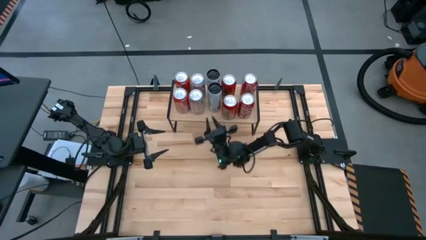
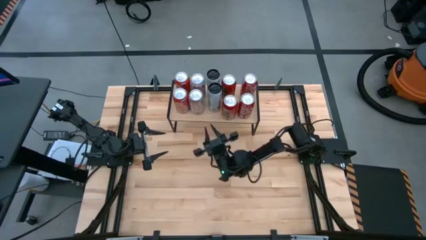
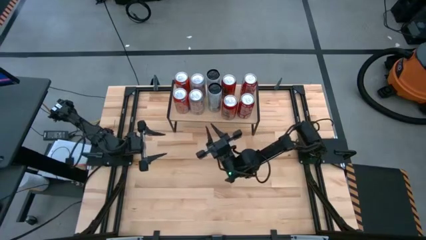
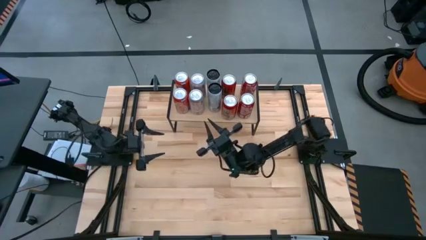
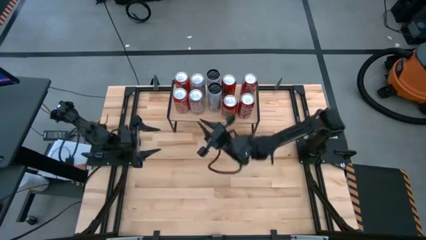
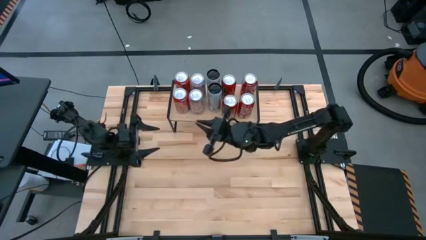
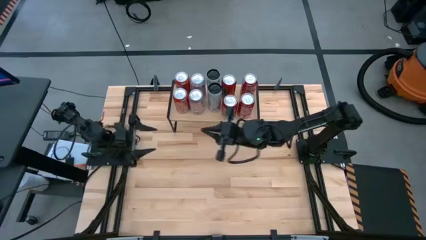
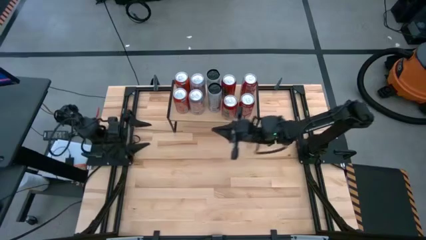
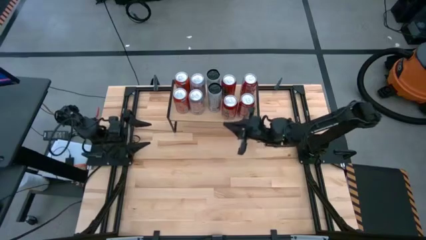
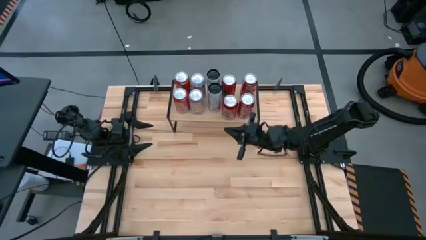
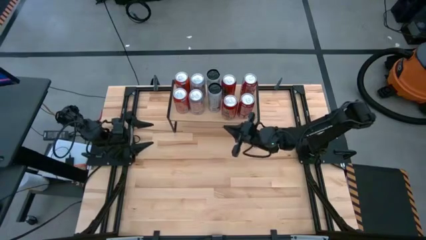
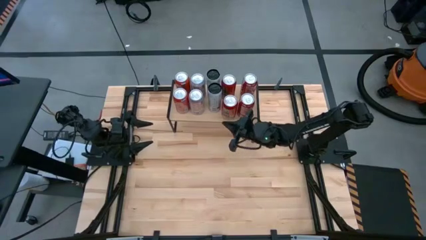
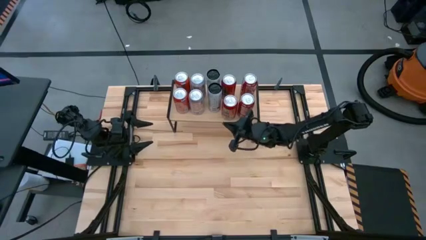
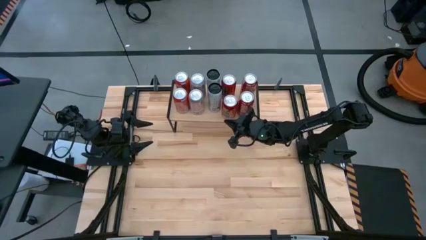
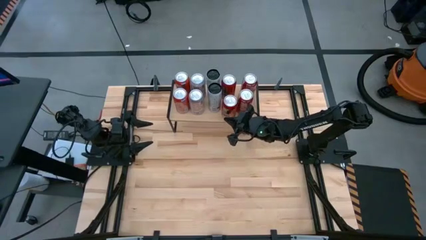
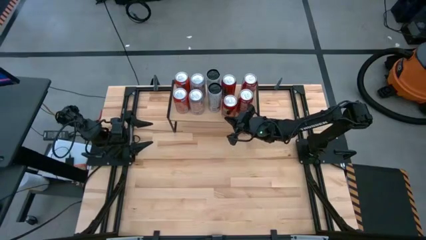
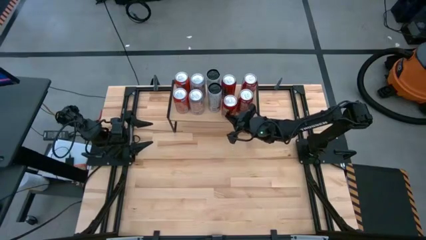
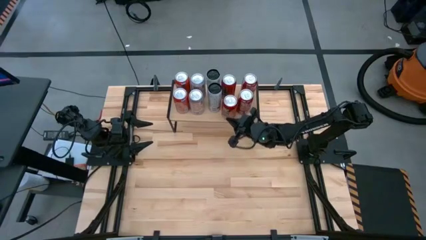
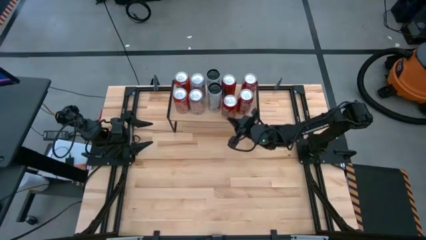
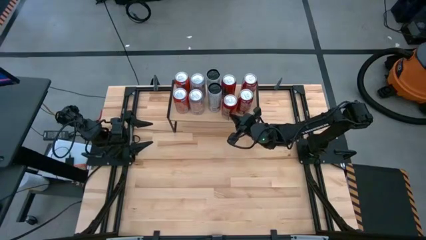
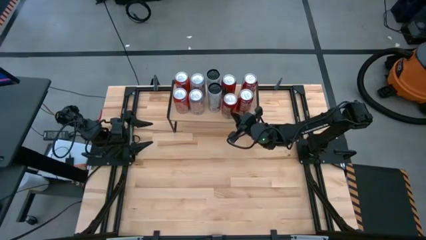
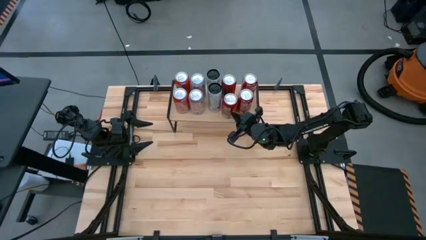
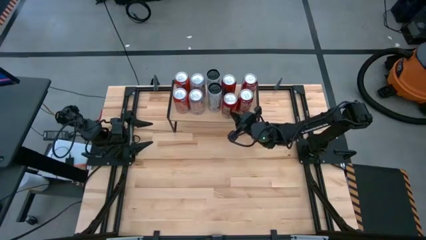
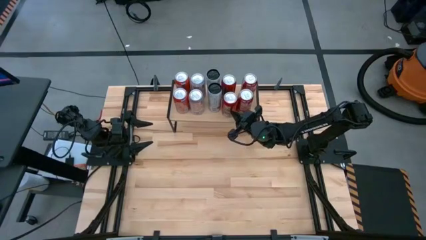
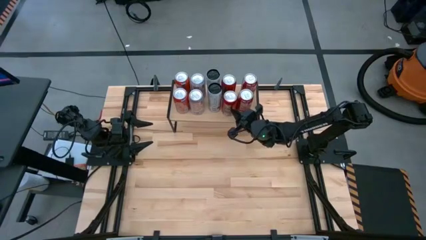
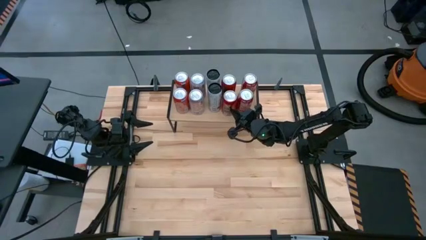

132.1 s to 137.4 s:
Task: Place canned beverage on shelf
Adjust the bottom red and black soda can on the shelf

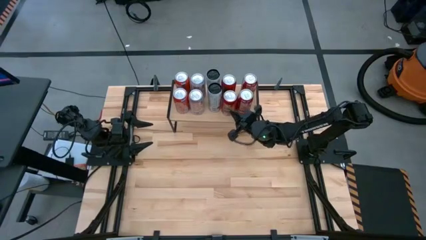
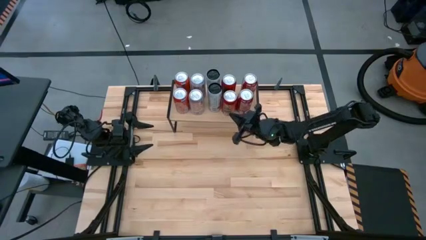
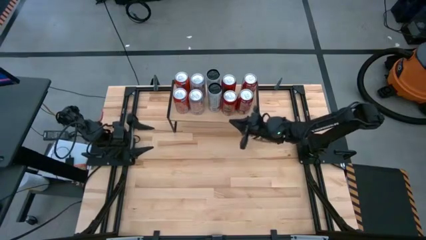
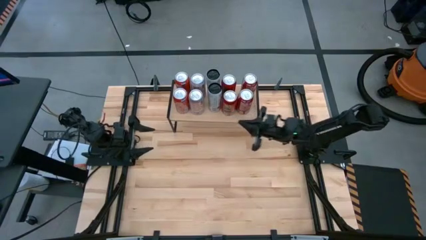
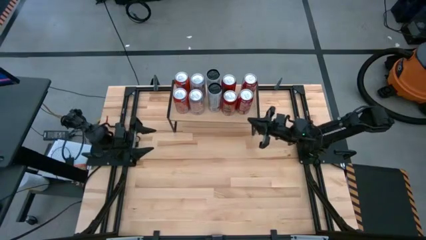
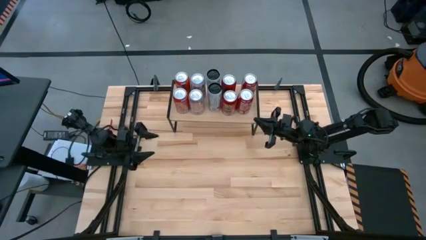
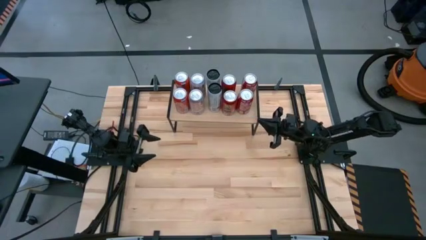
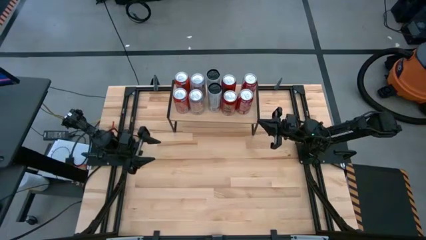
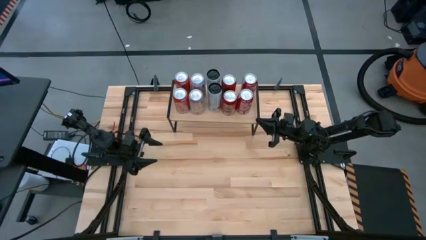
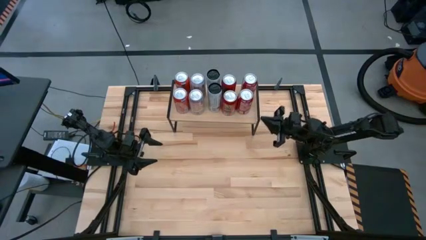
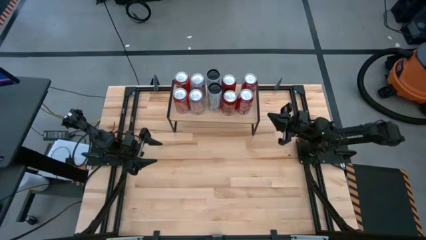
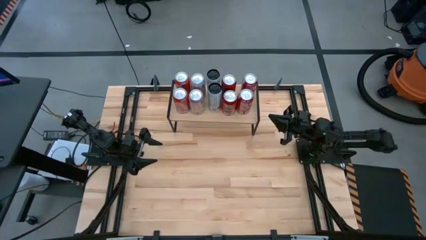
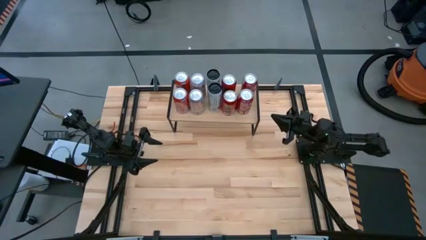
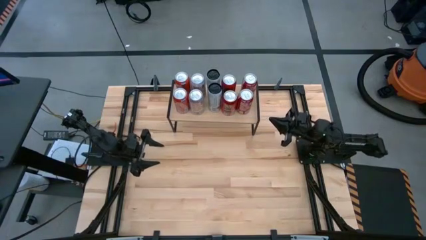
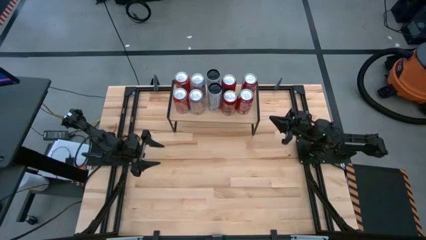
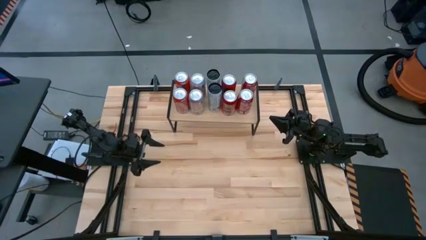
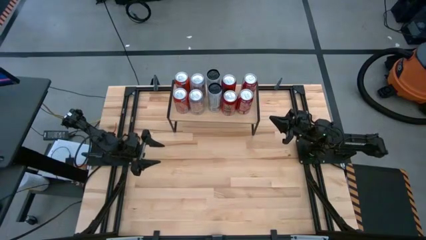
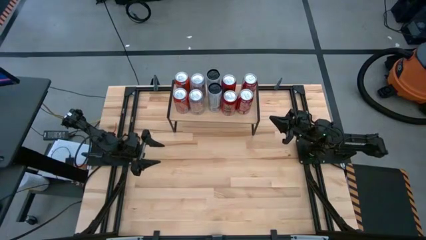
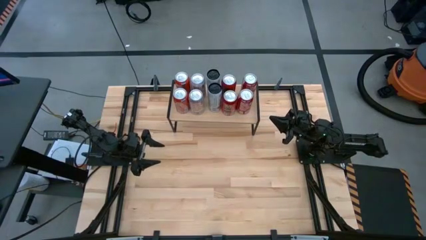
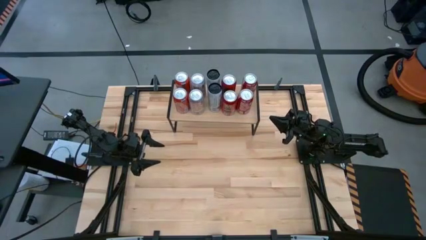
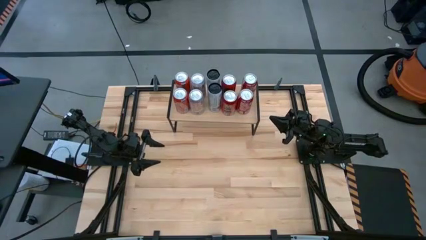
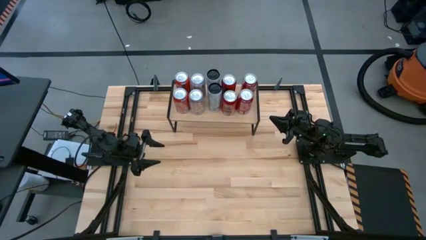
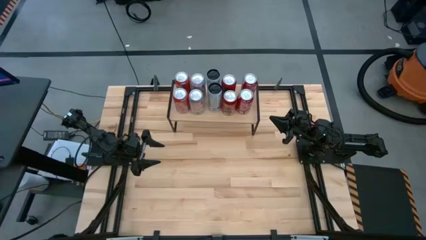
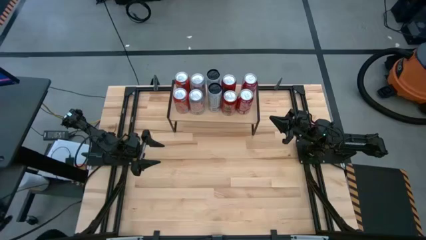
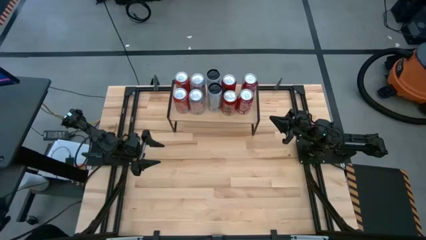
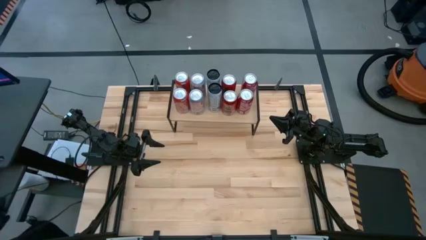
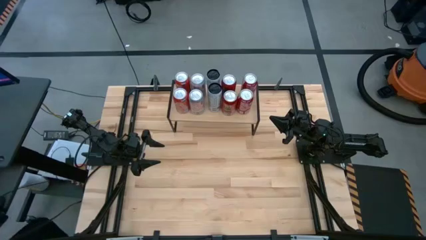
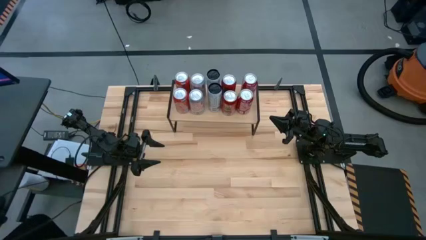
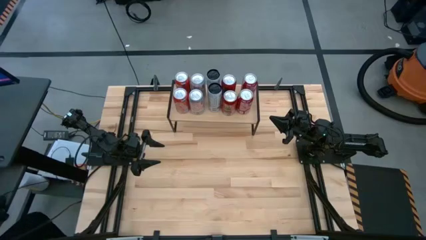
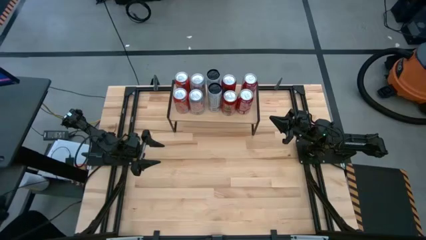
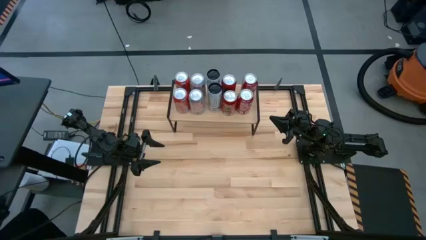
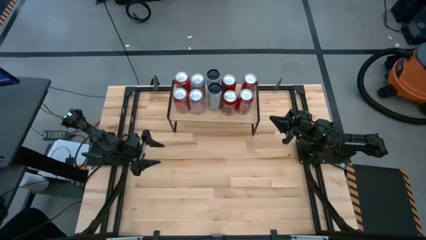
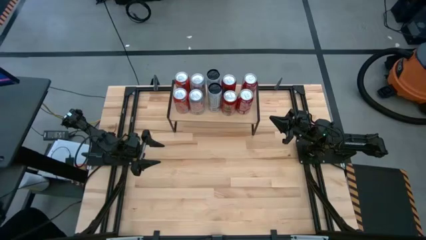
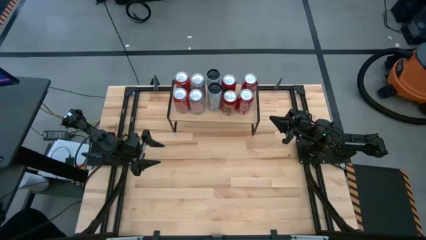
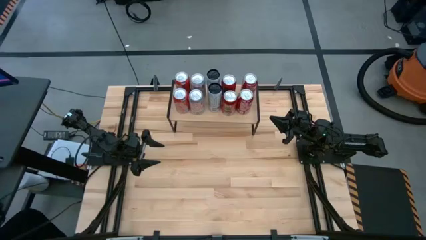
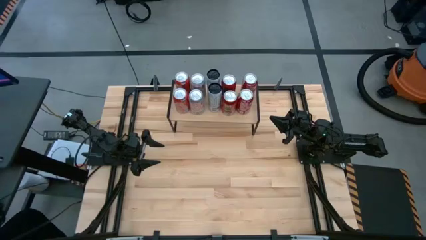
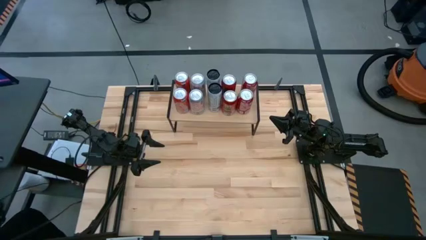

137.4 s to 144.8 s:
Return to Home Position

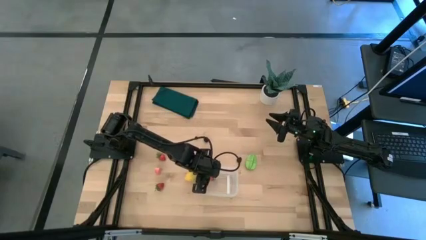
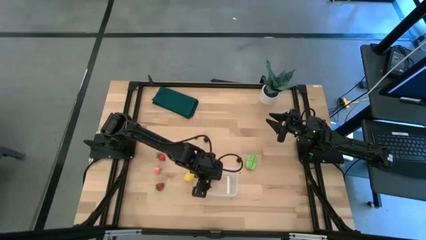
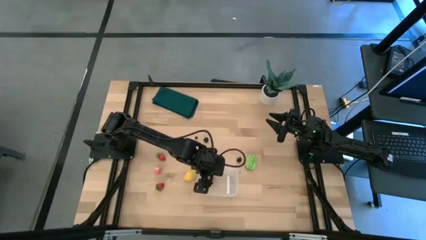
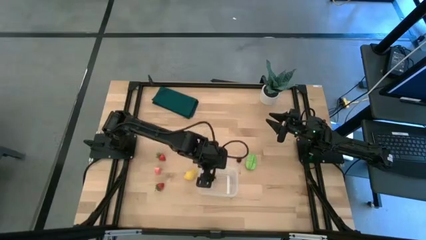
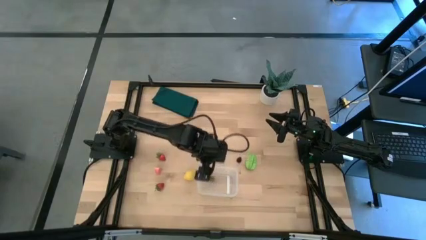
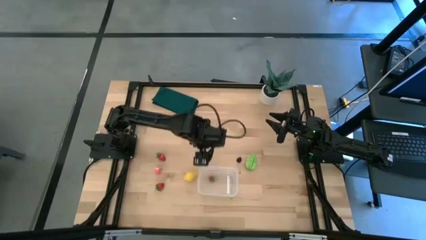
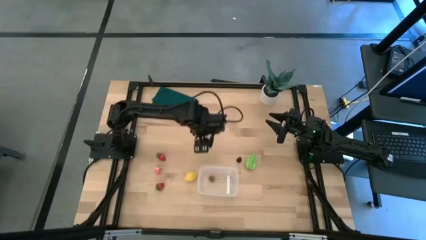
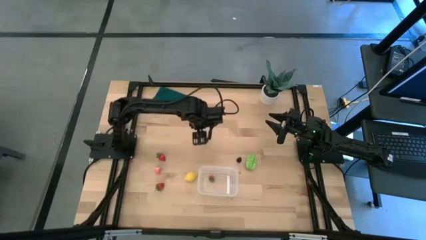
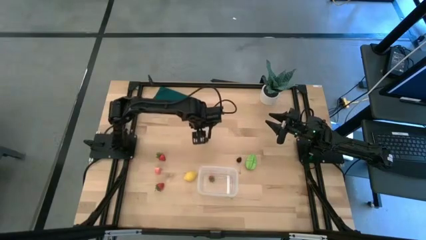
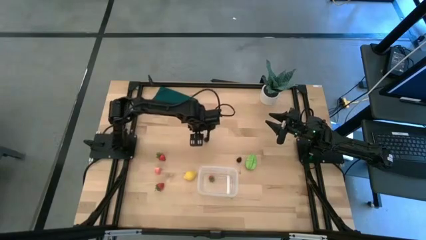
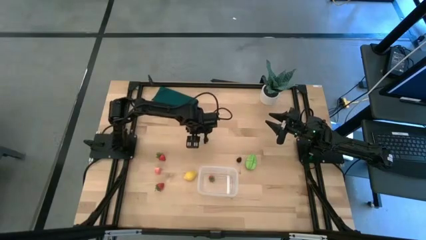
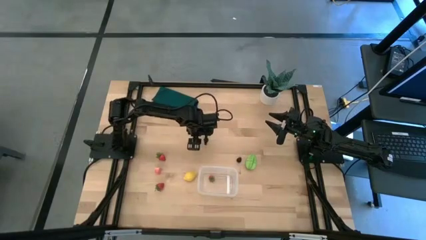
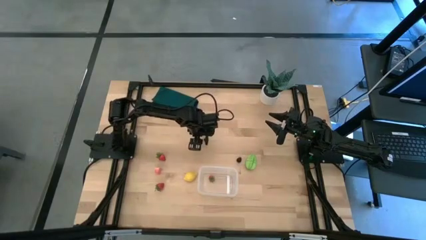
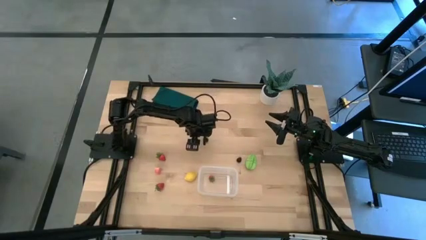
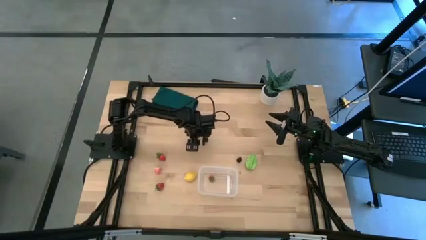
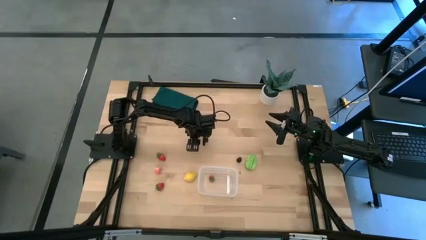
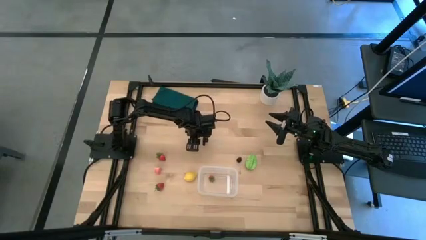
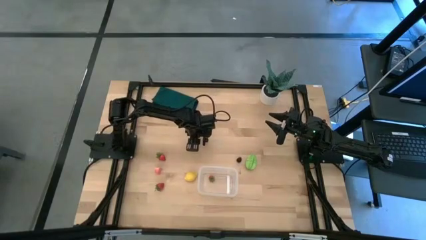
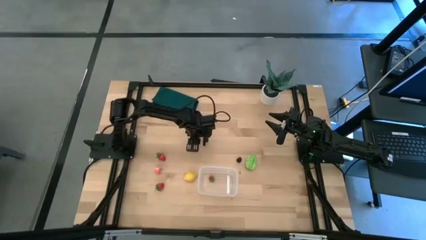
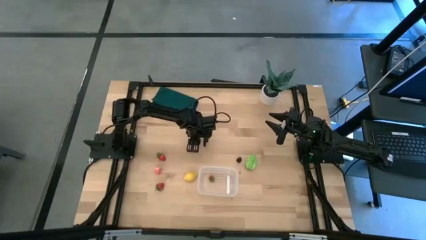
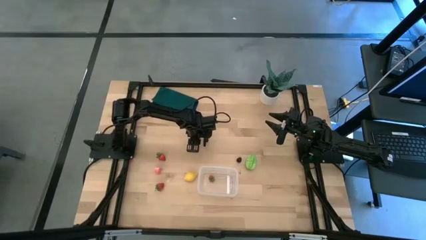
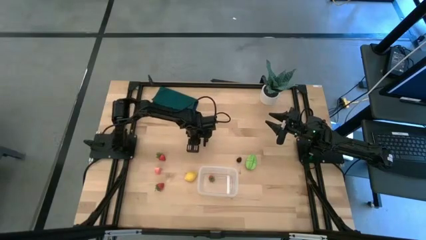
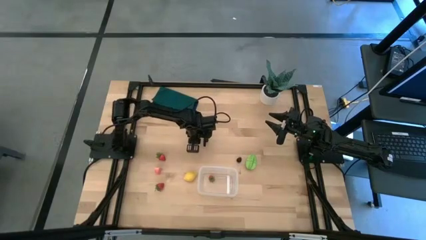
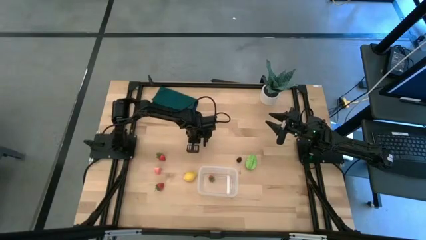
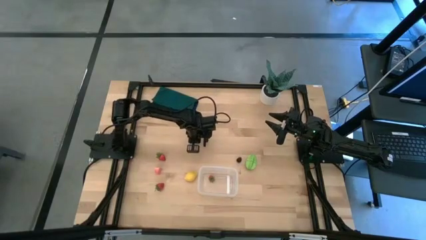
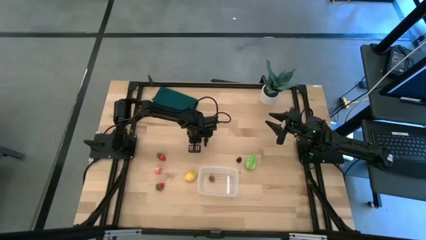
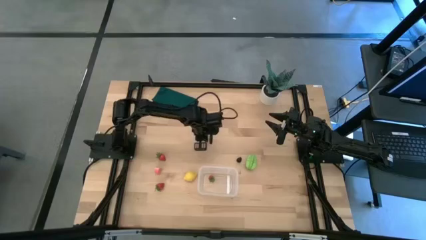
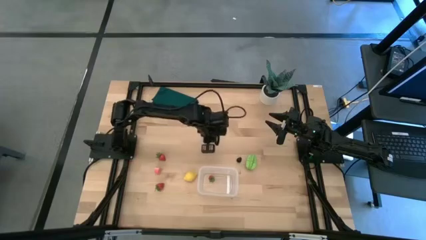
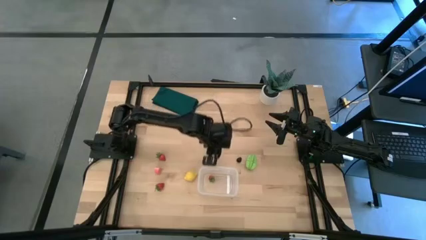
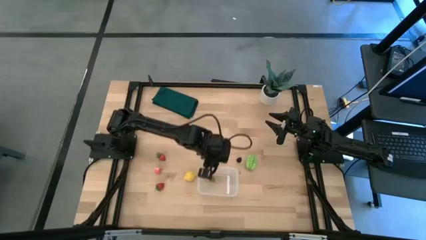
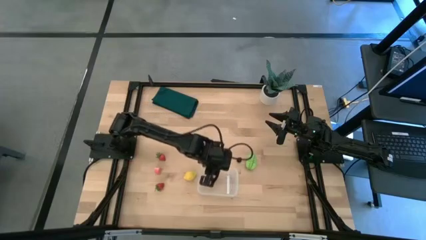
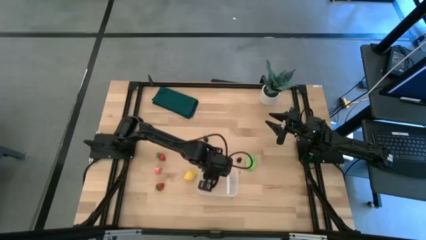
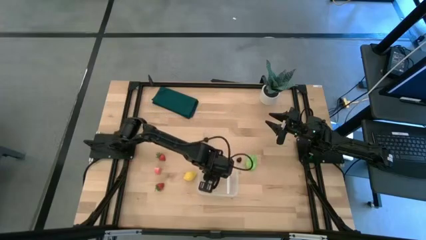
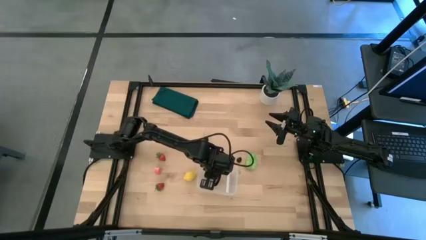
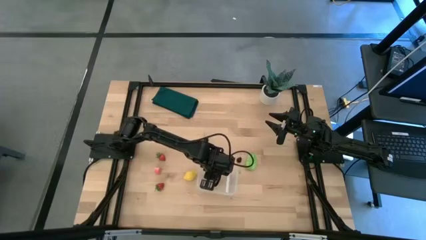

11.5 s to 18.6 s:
Task: Pick and placing Produce into tupperware
Put the blueberry into the transparent bin
